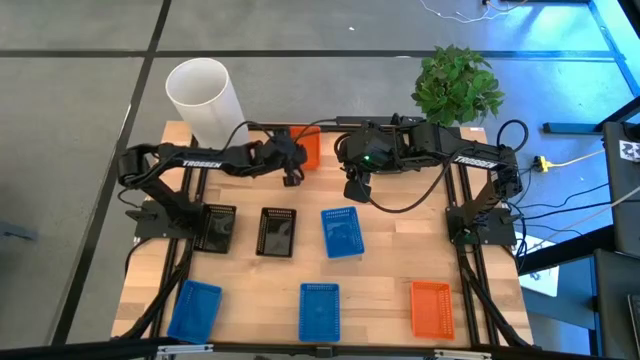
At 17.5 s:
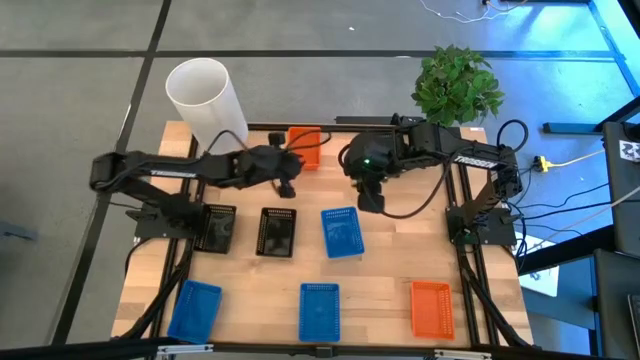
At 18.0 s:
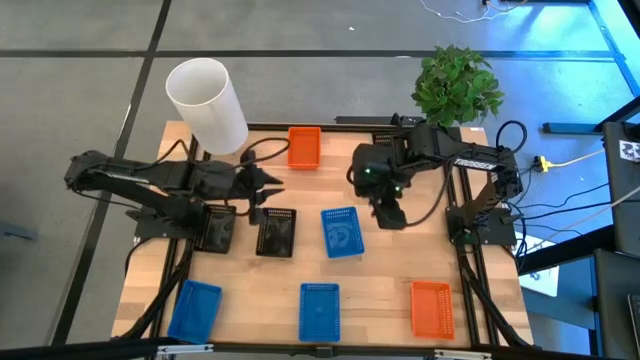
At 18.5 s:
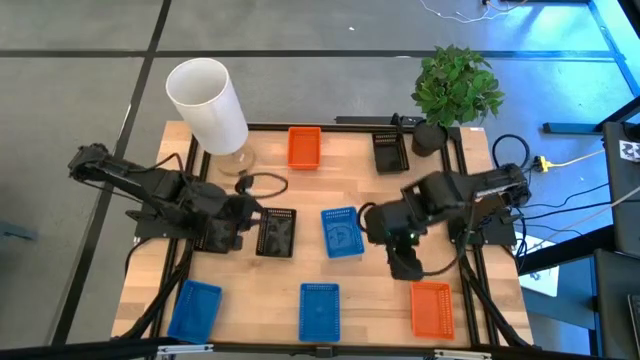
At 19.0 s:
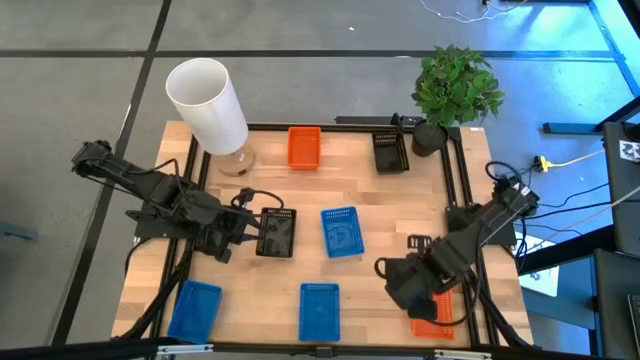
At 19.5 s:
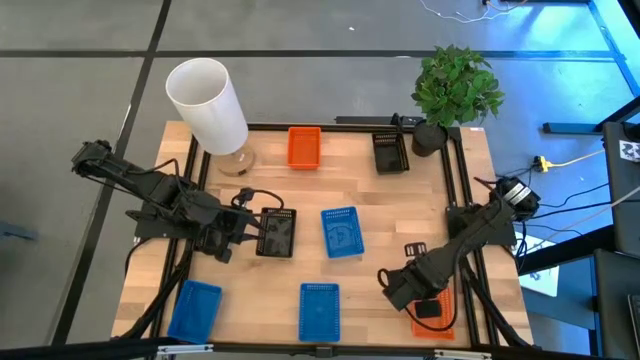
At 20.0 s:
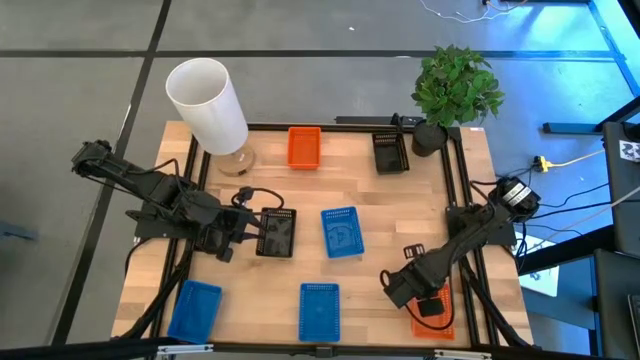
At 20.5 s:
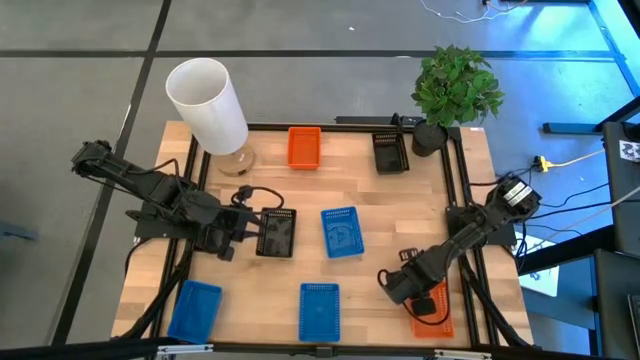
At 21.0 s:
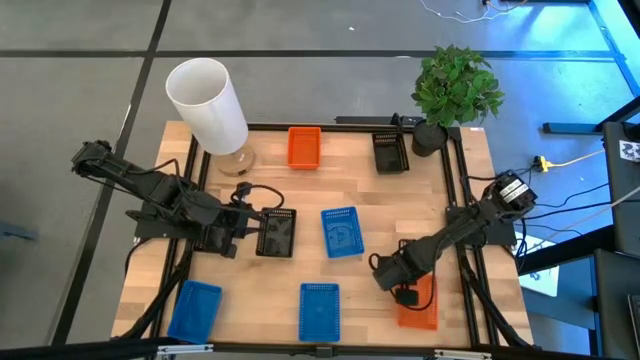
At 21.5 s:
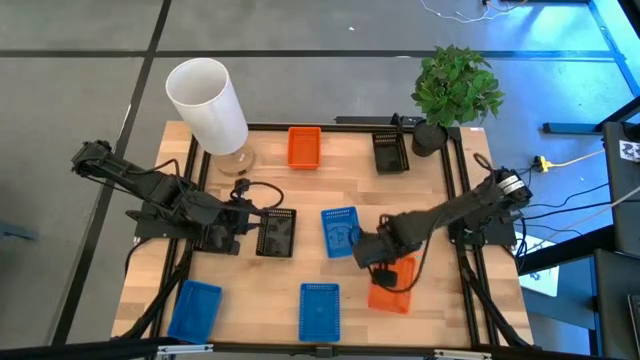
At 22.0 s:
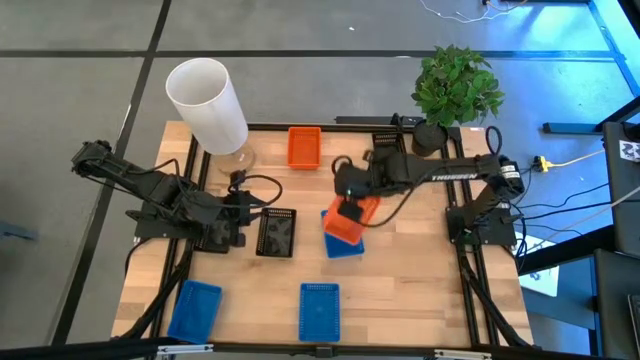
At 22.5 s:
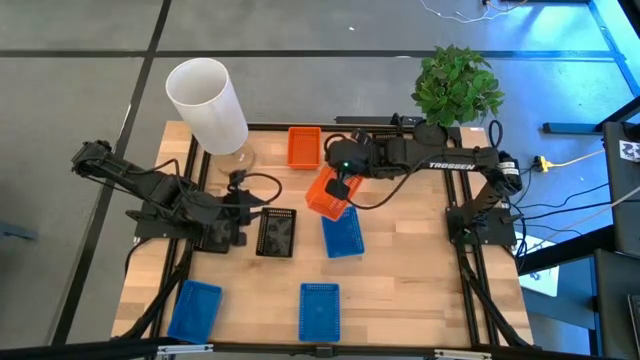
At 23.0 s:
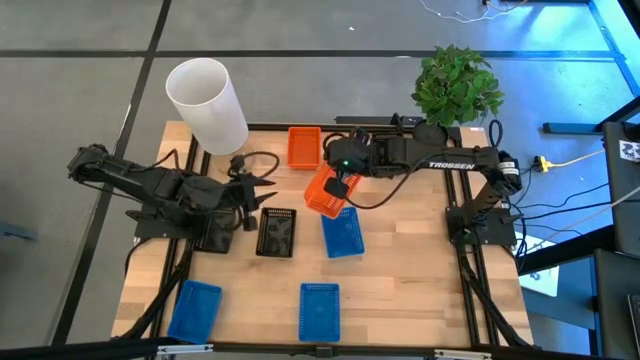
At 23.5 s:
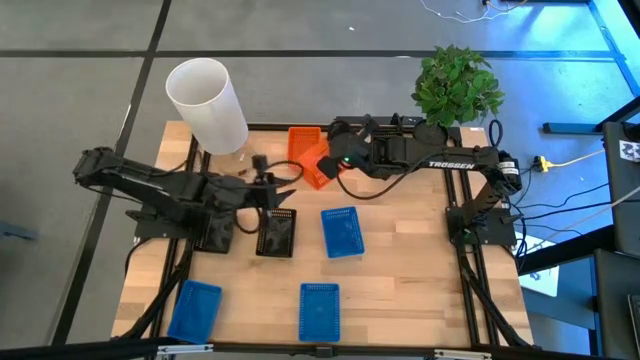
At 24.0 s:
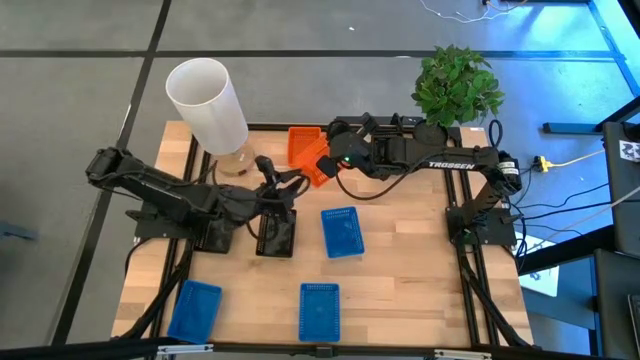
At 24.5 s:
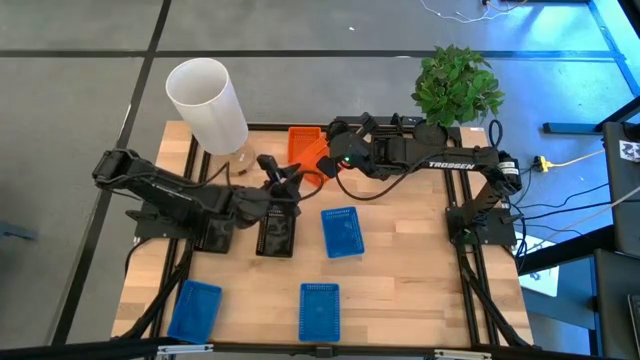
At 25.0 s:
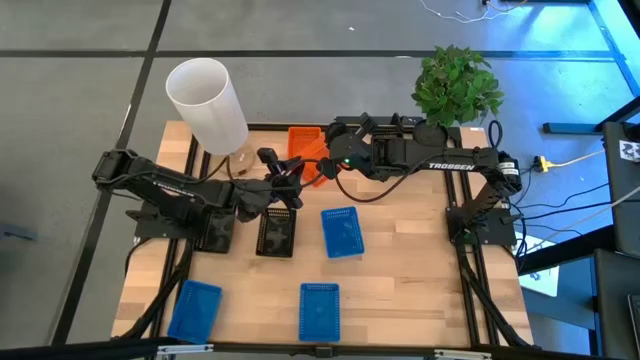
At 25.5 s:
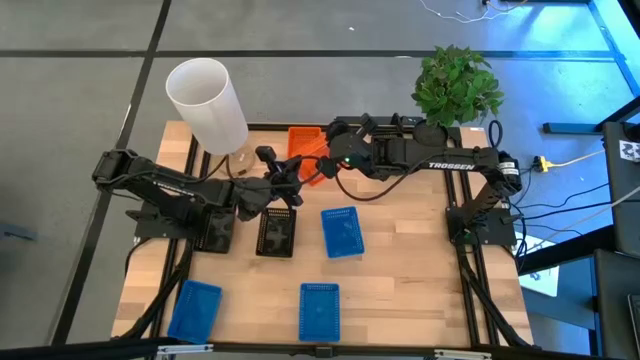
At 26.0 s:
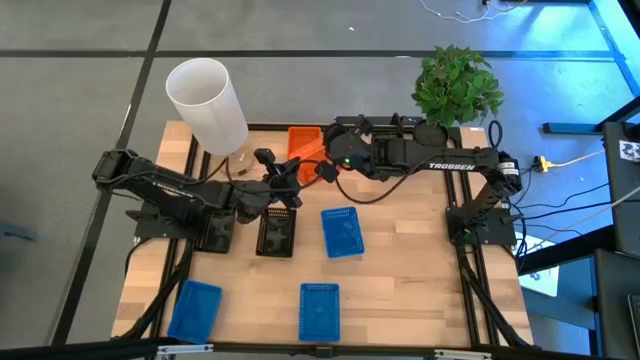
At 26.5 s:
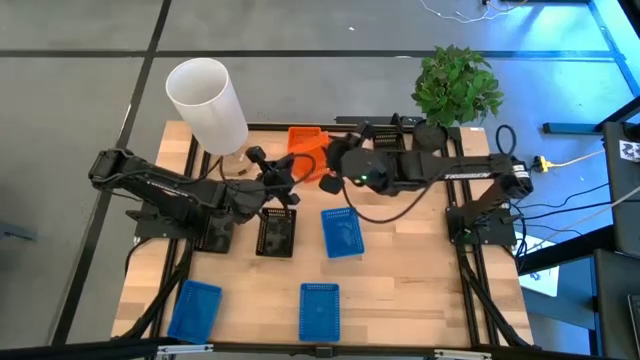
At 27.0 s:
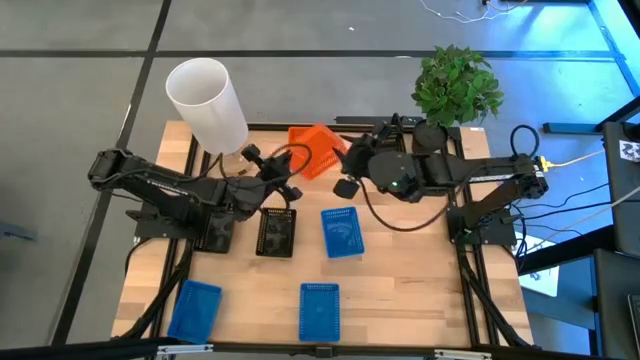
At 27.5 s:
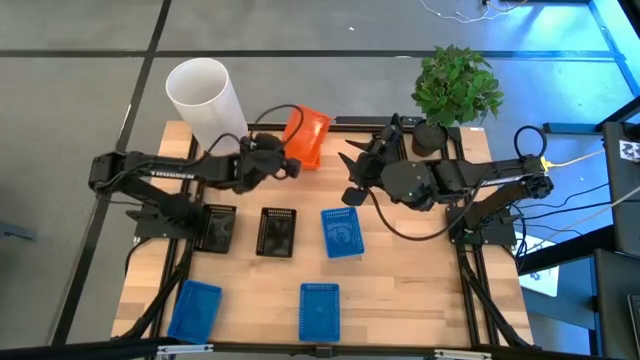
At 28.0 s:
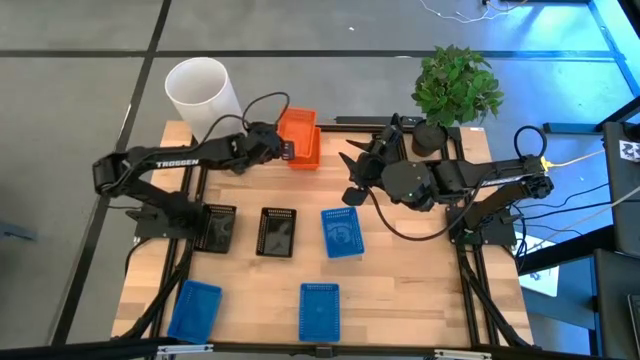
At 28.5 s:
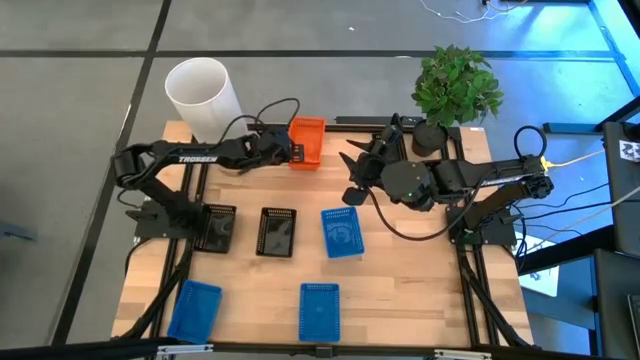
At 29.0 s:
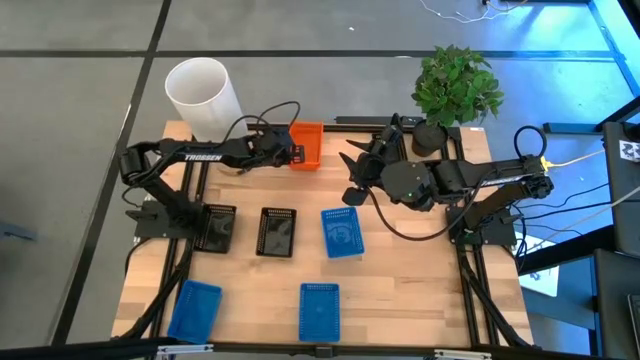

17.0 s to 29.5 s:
Stack the bottom orange bin on top of the top orange bins

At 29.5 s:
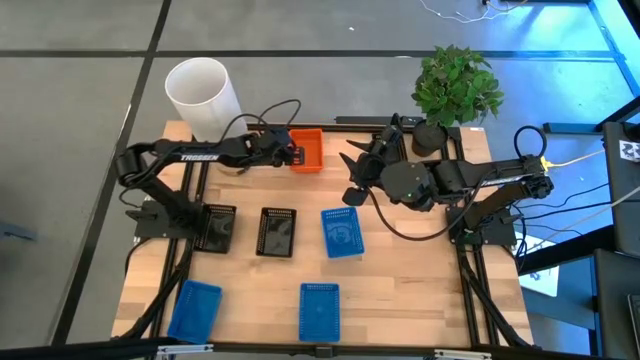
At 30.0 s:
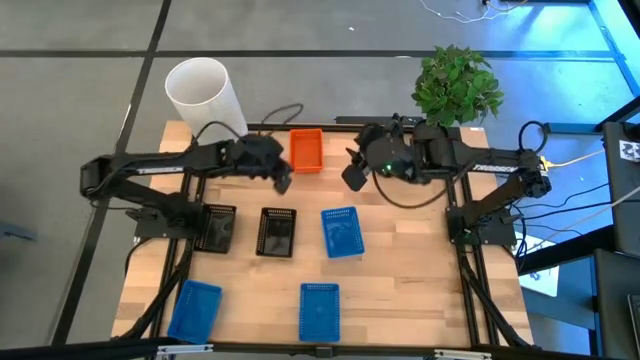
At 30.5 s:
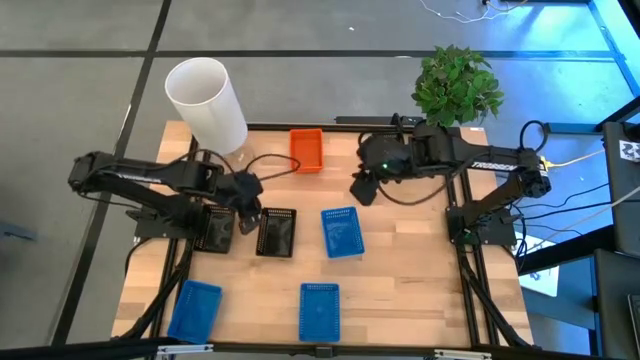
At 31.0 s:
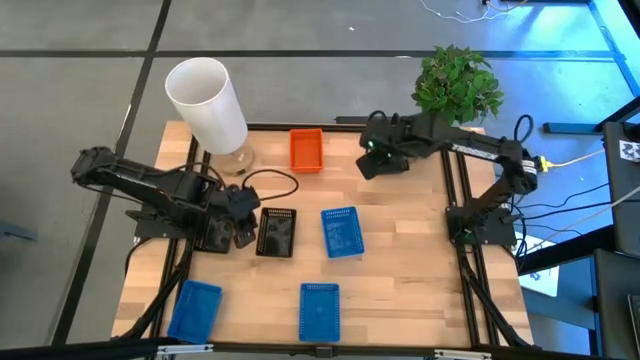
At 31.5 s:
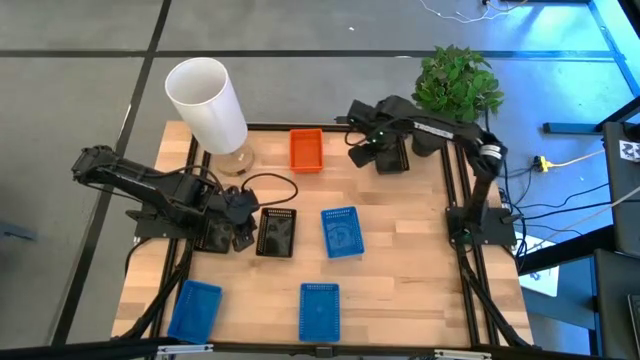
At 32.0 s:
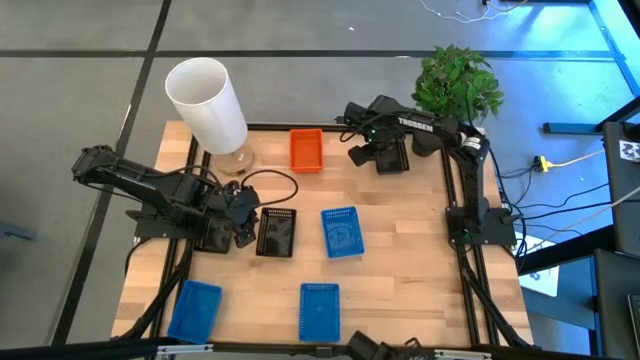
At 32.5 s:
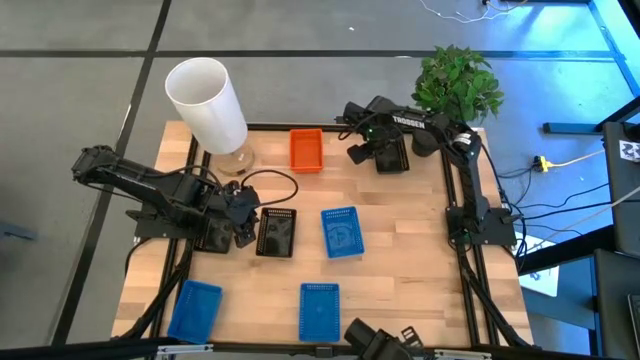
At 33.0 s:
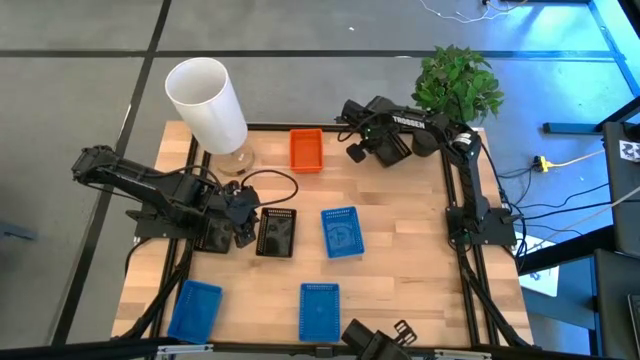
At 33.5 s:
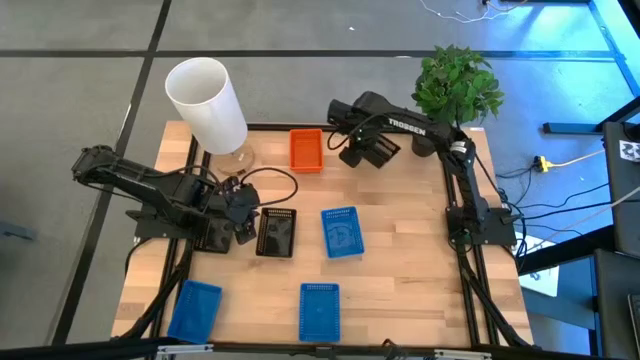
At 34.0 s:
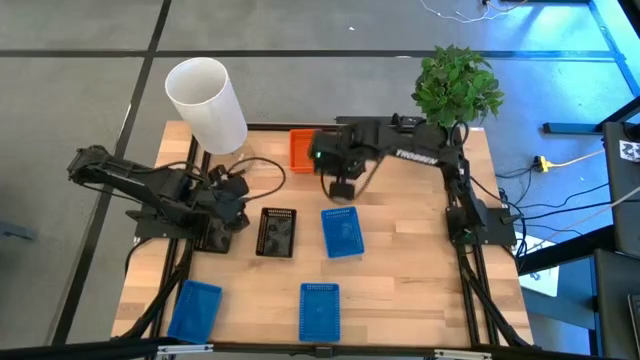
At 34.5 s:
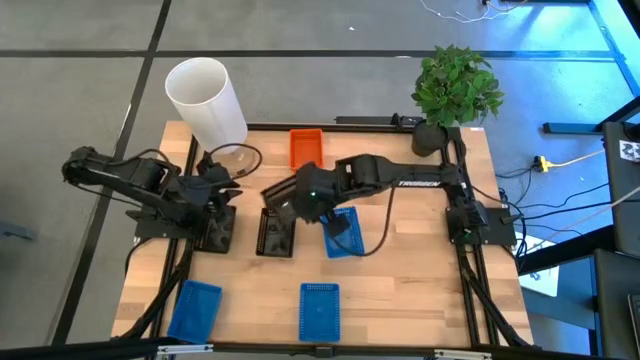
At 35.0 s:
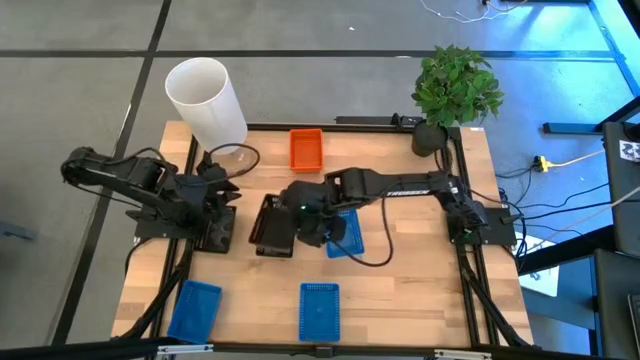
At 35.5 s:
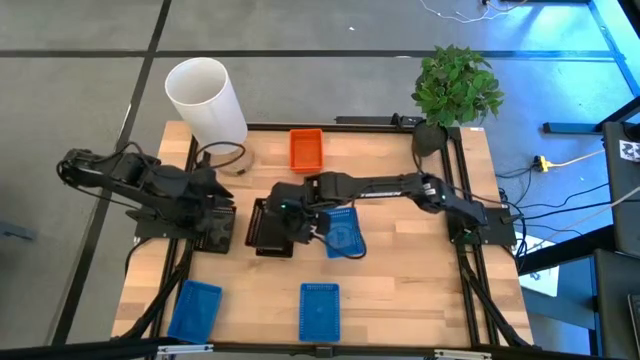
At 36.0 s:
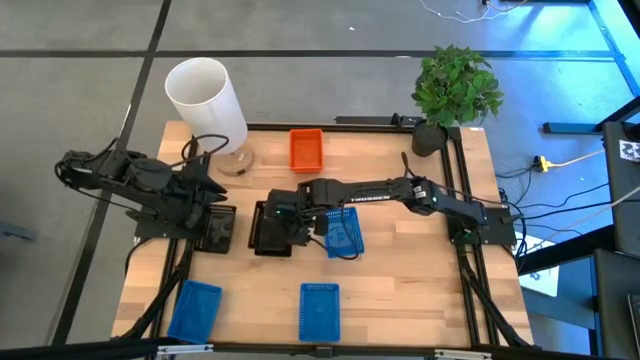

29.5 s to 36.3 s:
Stack the top black bin on top of the bottom right black bin
